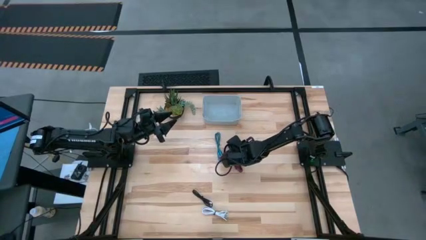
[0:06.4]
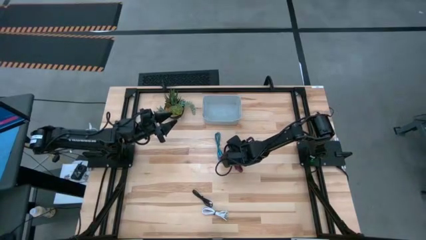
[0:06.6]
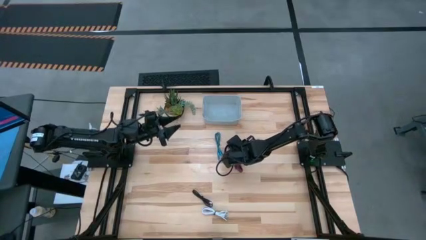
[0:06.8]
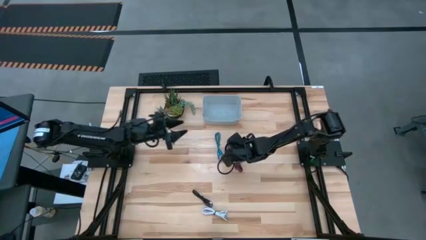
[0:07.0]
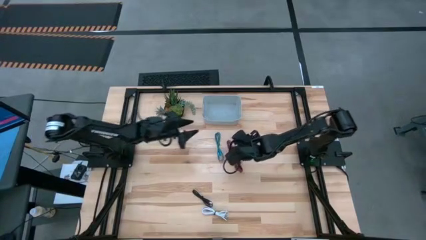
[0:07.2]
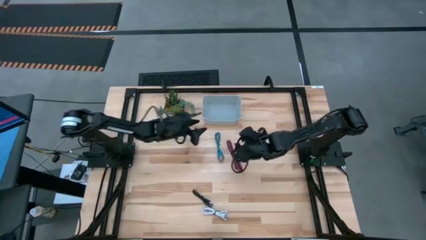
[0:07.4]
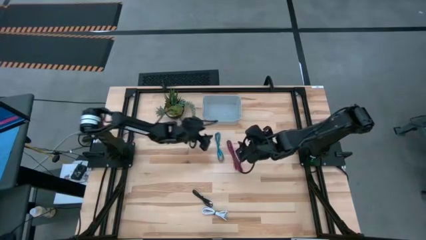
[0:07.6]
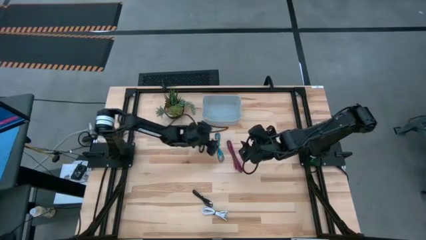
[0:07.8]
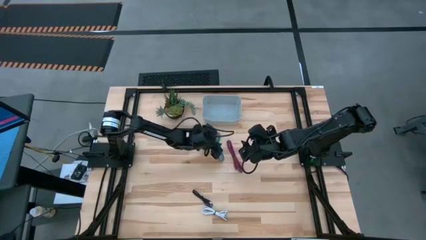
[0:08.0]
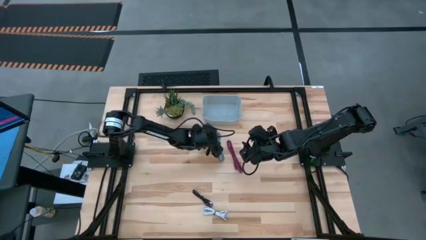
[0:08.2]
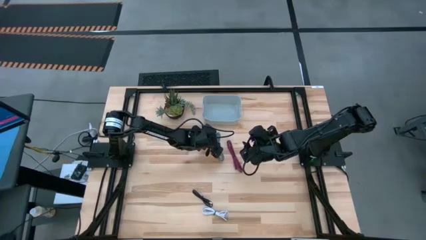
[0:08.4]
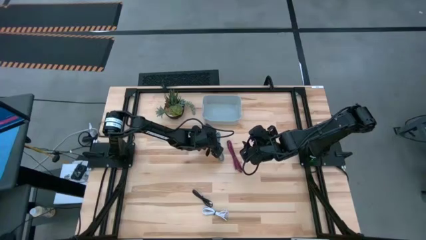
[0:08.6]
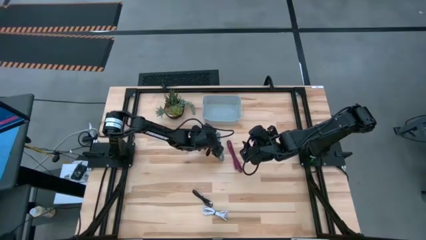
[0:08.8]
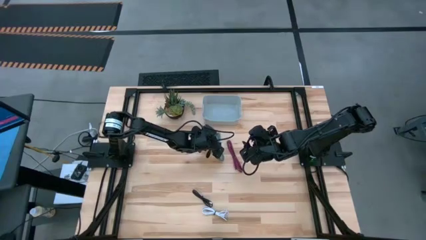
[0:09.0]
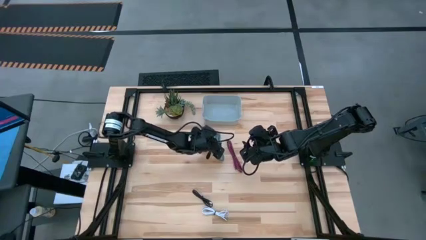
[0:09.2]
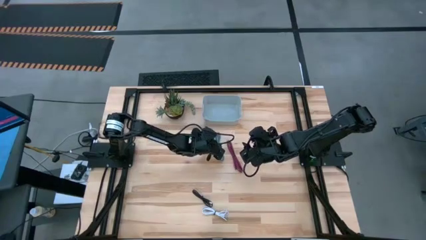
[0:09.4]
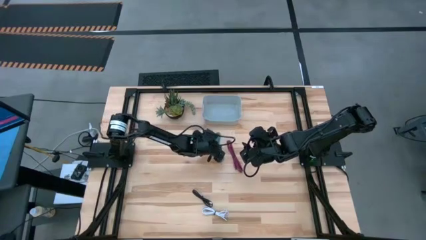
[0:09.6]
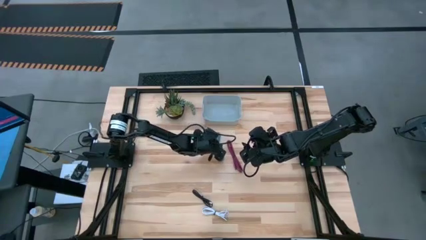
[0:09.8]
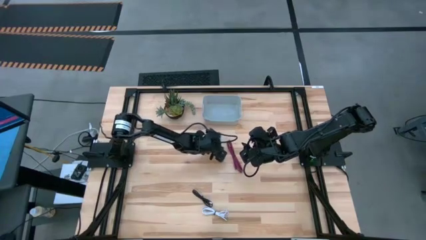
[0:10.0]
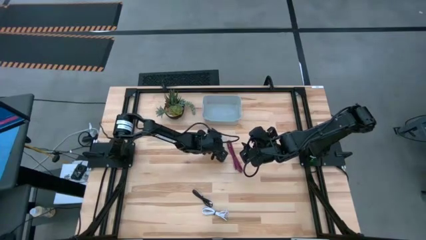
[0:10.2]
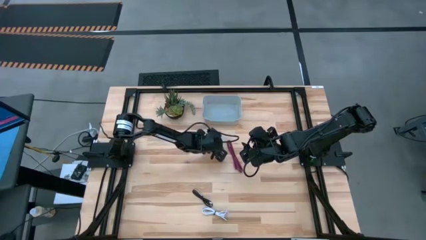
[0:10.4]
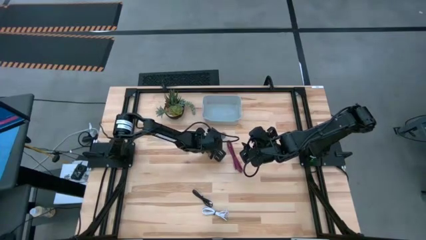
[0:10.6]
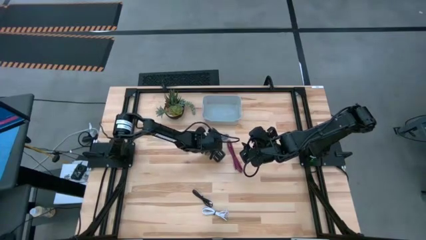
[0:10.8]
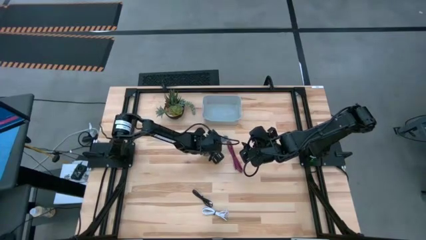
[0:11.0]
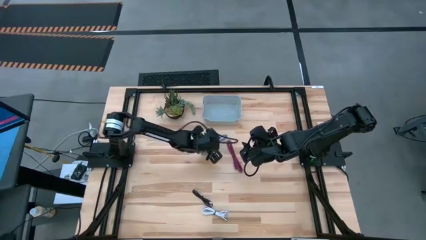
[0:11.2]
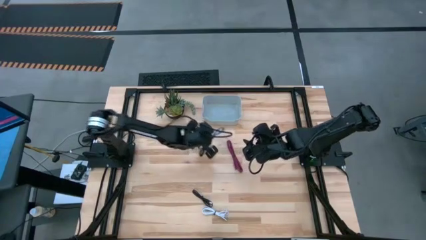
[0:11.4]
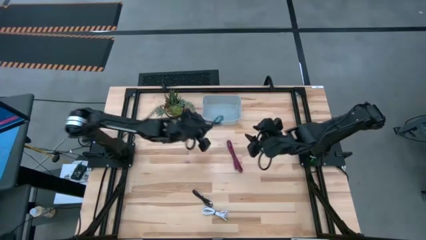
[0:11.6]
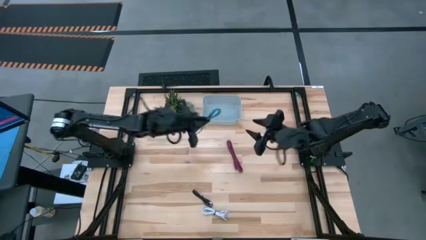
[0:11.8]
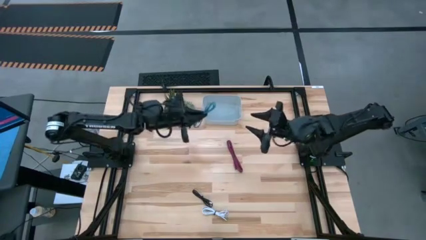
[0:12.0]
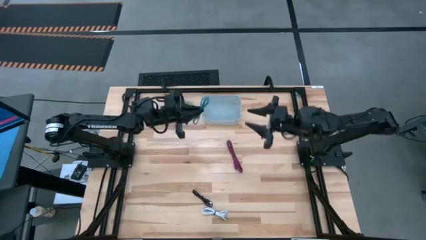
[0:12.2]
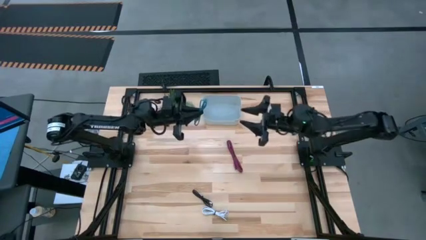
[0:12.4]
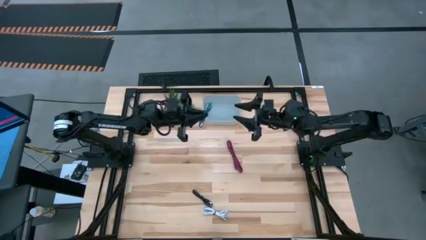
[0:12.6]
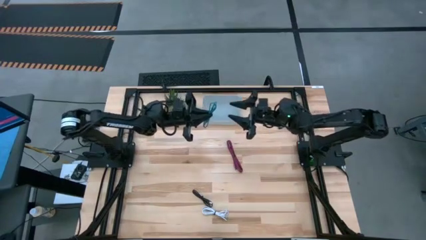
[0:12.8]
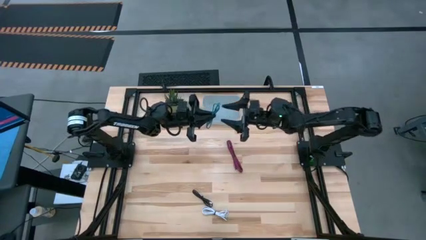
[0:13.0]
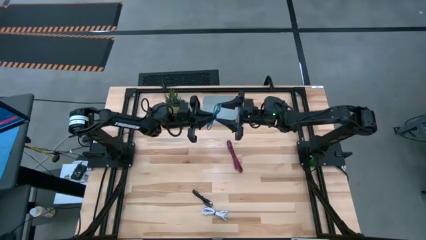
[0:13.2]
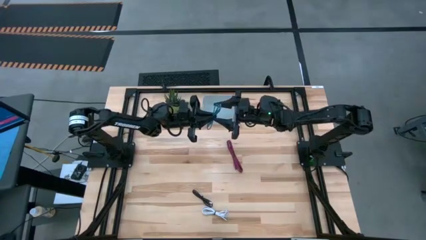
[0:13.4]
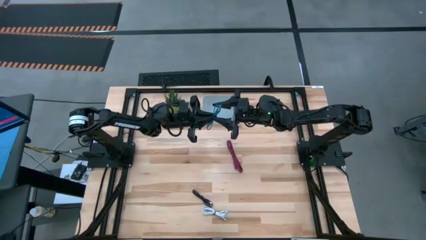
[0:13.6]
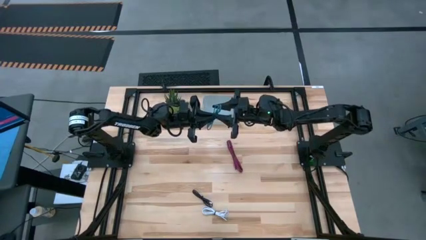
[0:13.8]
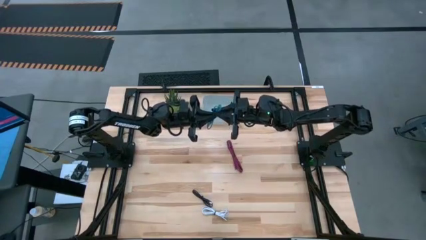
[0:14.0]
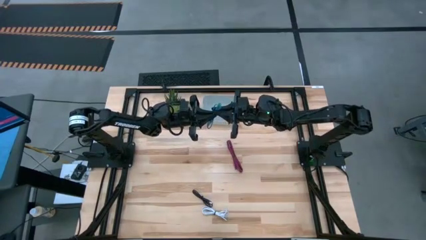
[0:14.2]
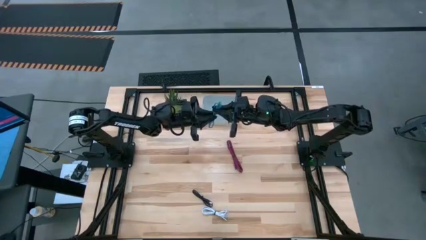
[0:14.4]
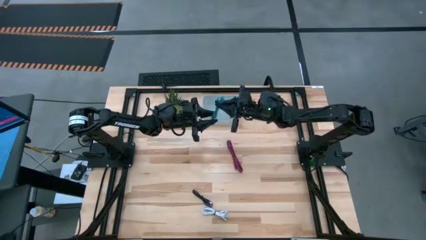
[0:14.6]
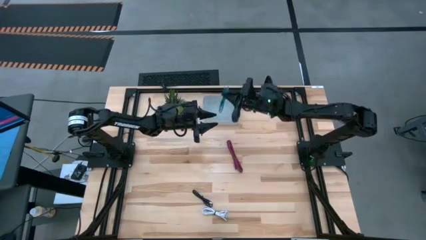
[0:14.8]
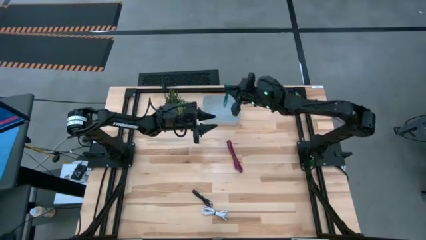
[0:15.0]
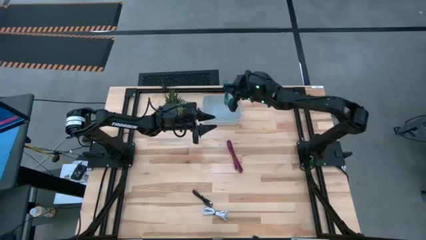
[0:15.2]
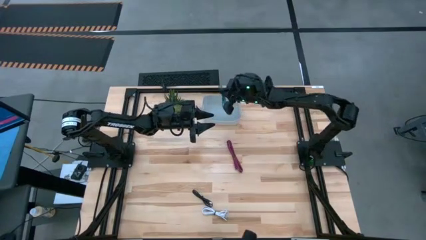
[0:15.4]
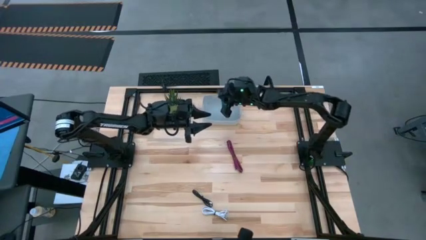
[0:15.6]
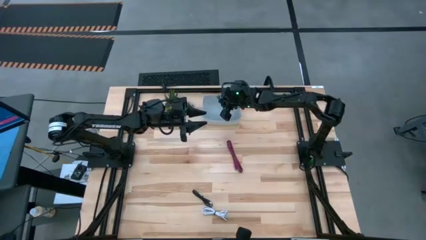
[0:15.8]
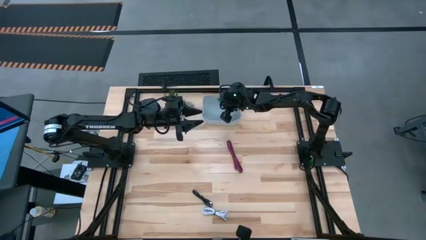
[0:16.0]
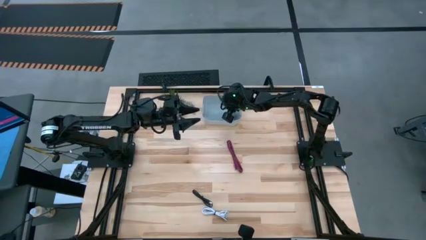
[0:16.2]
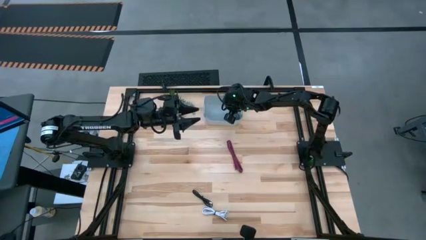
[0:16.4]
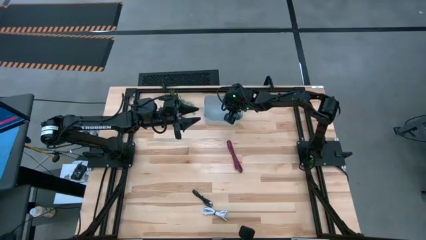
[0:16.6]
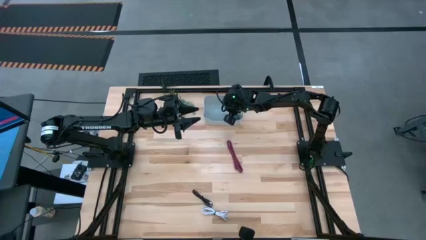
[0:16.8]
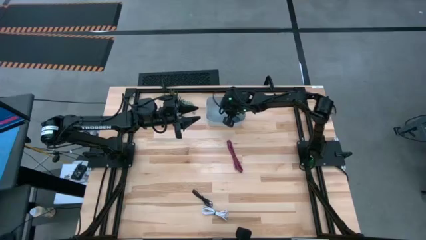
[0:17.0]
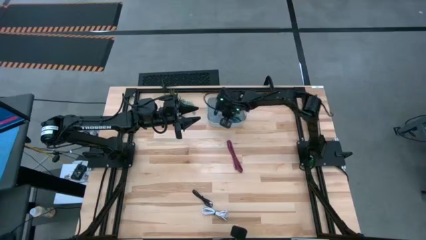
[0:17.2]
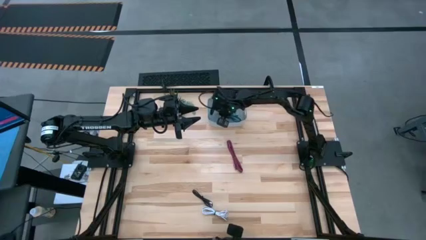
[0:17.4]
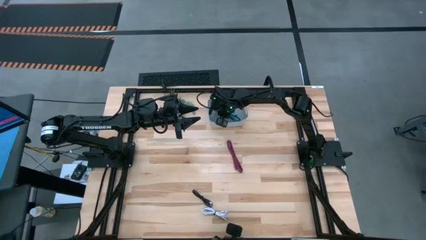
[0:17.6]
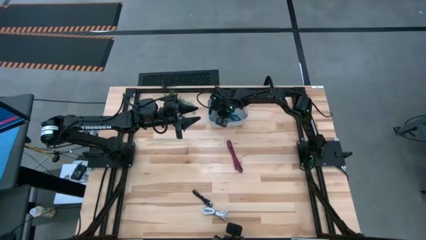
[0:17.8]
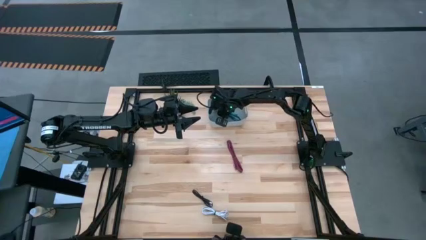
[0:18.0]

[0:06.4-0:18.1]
Task: Pick and place USB-C Cables
Put the blue charger cable into the white bin
